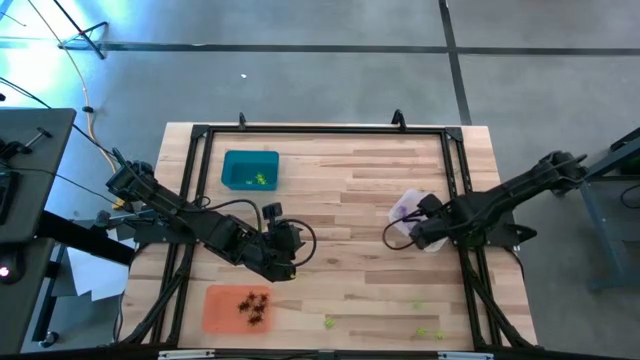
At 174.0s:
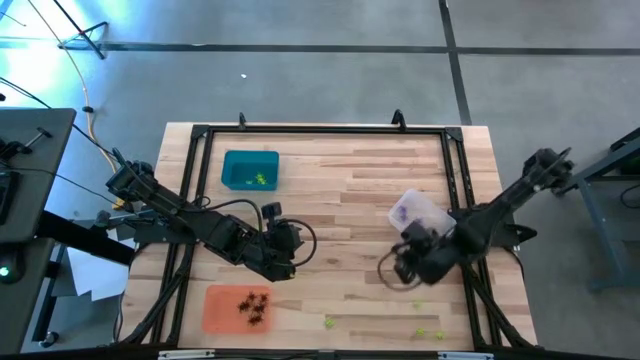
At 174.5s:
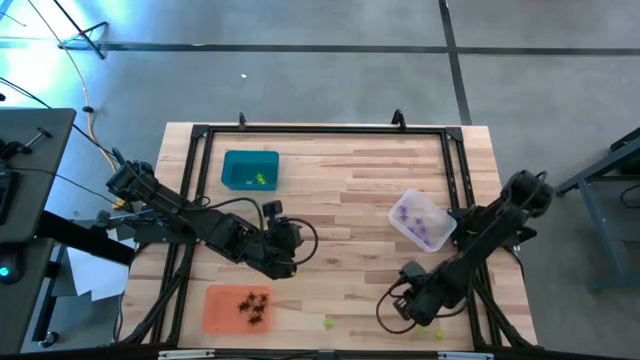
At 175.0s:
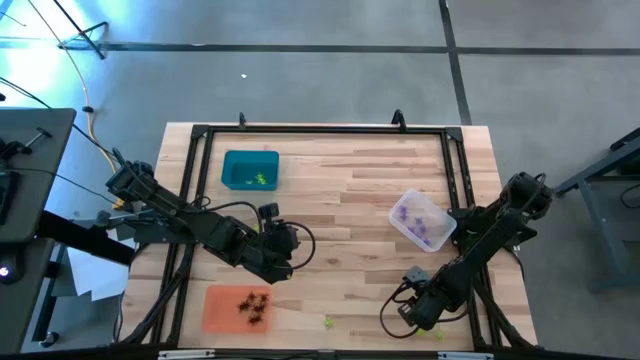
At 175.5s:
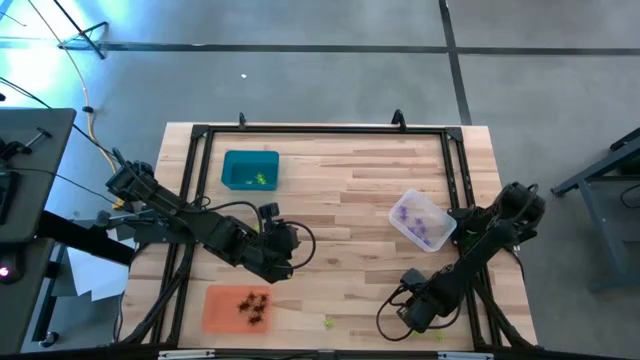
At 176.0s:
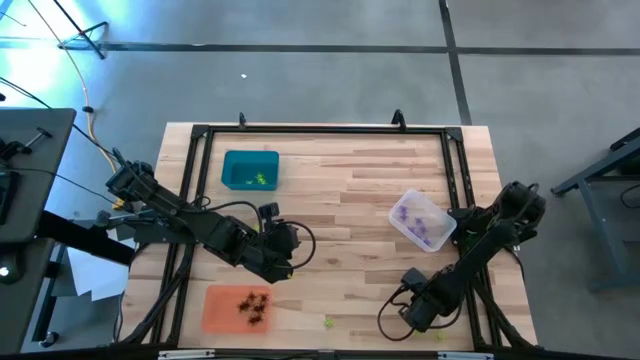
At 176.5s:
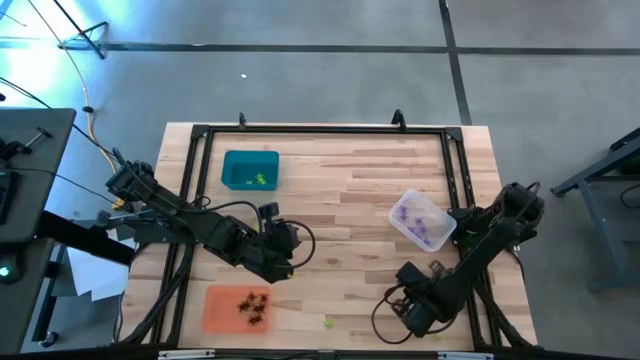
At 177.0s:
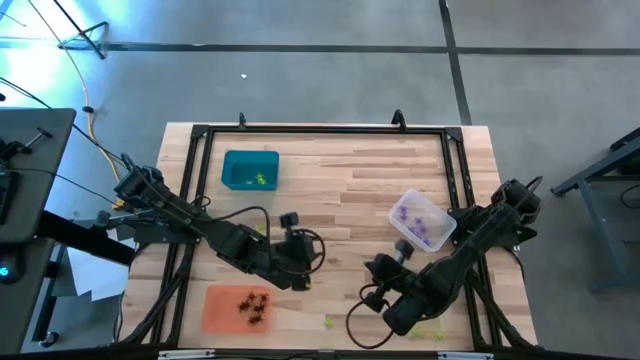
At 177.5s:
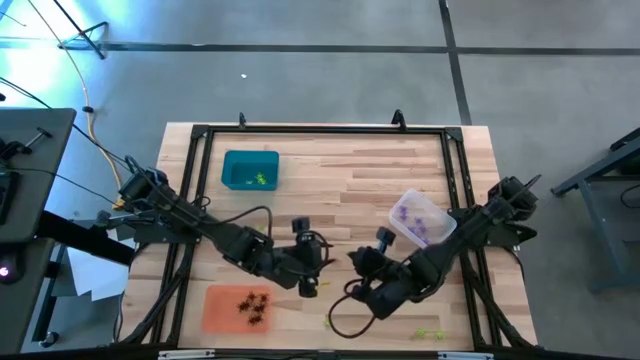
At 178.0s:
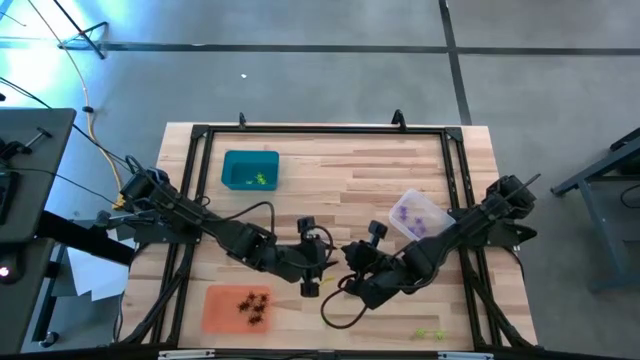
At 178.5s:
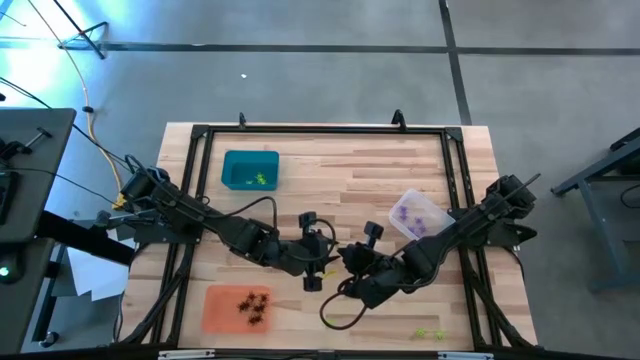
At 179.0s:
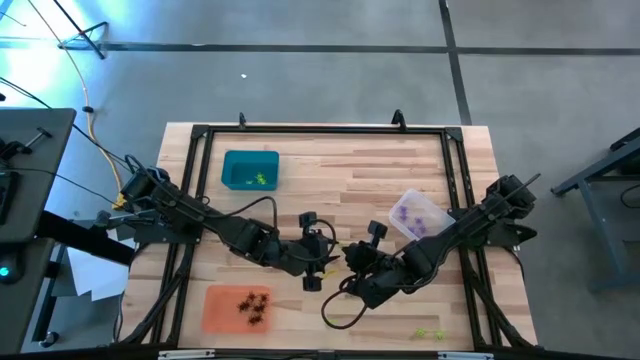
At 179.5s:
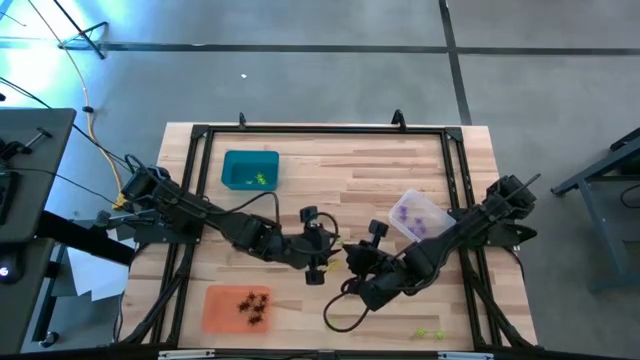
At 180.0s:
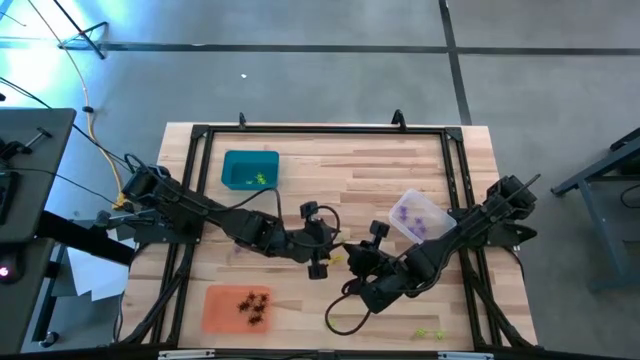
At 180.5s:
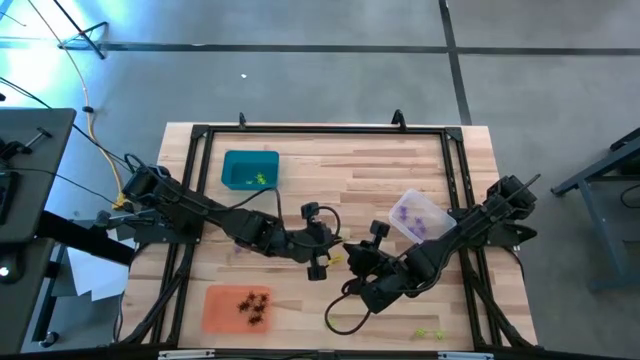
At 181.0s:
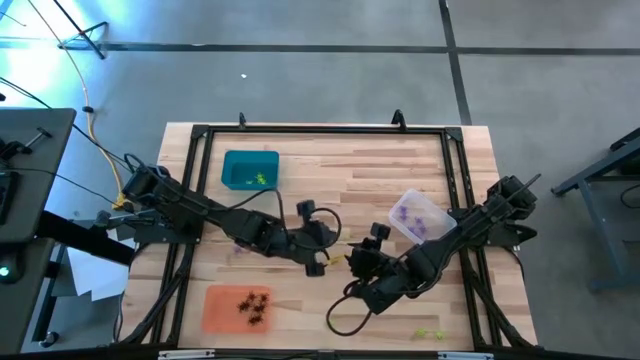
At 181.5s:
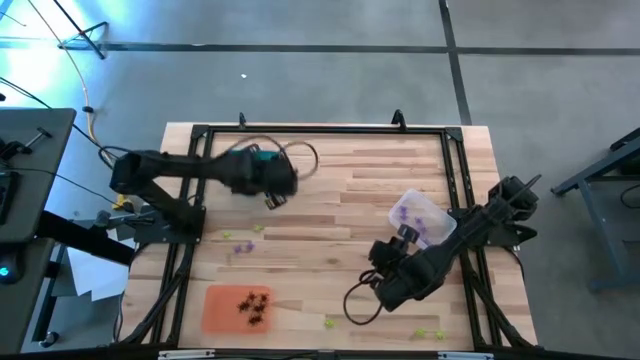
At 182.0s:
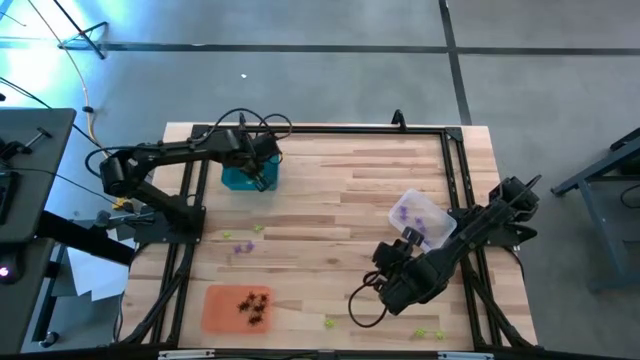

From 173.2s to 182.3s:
Task: Sort Halloween decoration
Put the green spider toy into the blue bin

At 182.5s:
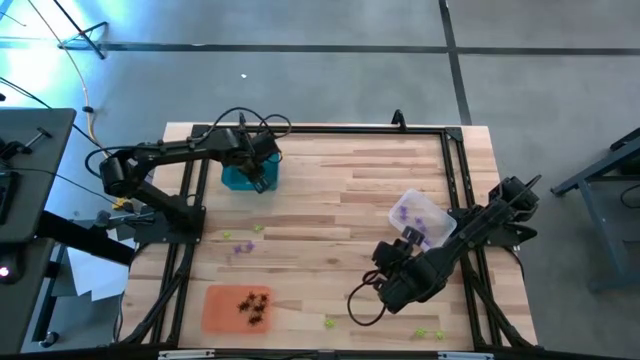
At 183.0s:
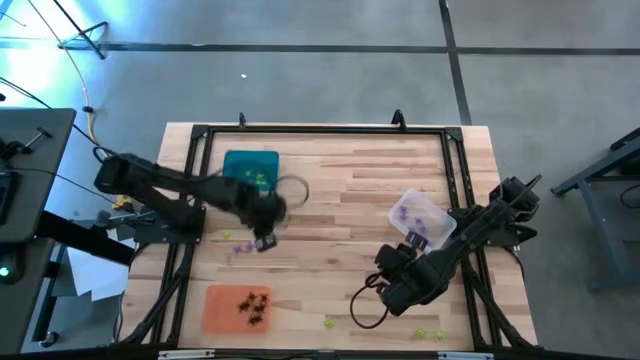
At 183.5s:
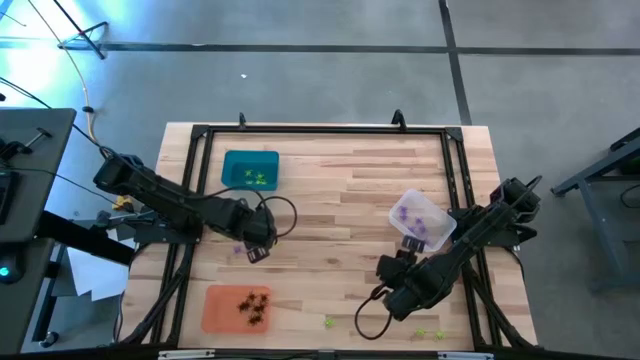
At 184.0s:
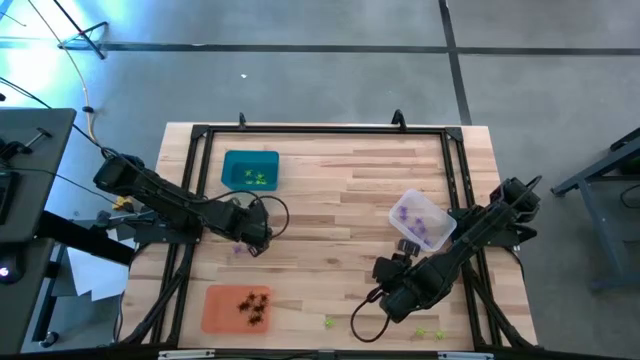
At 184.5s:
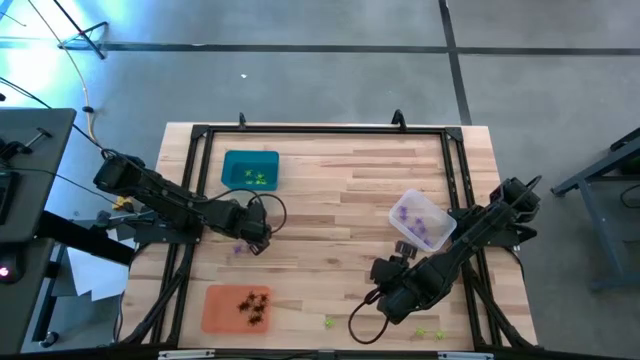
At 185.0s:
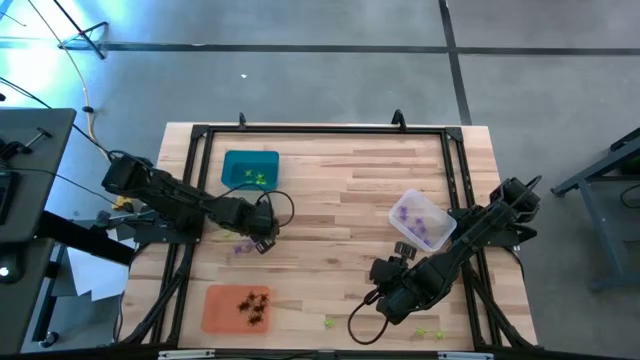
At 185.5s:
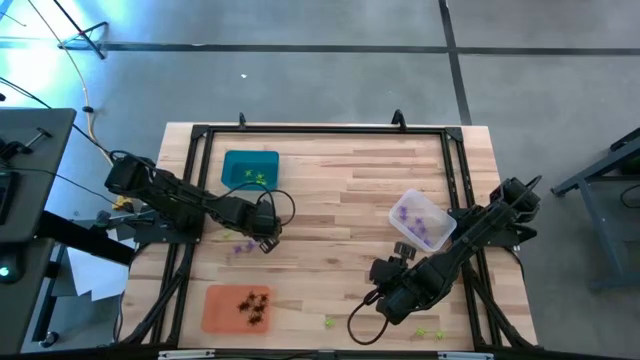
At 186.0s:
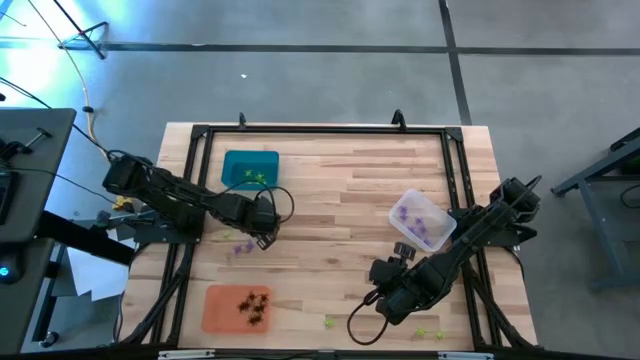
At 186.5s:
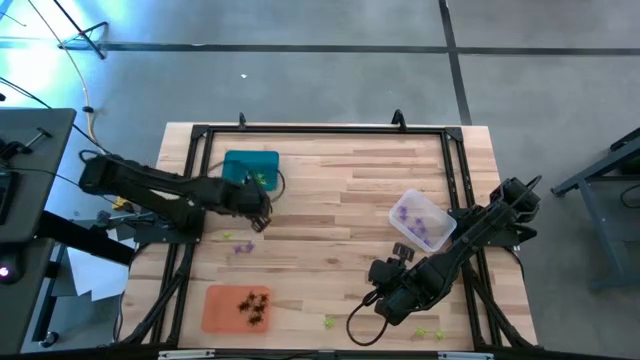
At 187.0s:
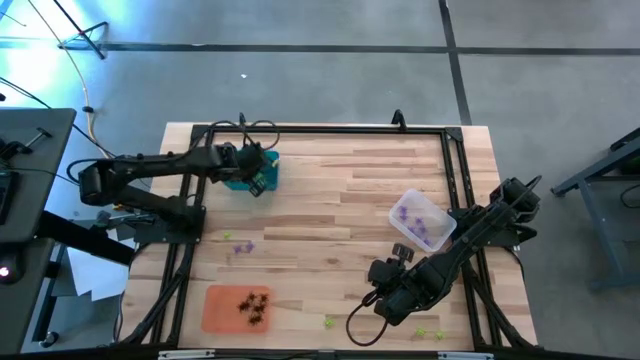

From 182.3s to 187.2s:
Put the green spider toy into the blue bin

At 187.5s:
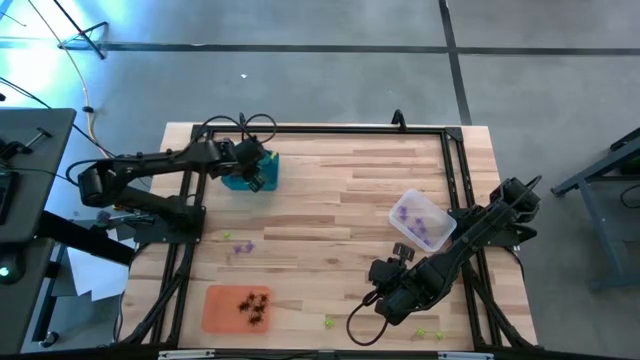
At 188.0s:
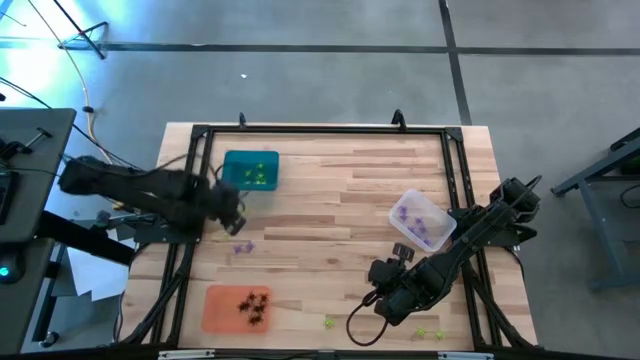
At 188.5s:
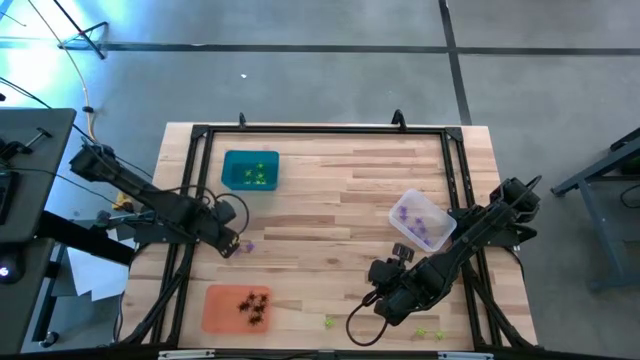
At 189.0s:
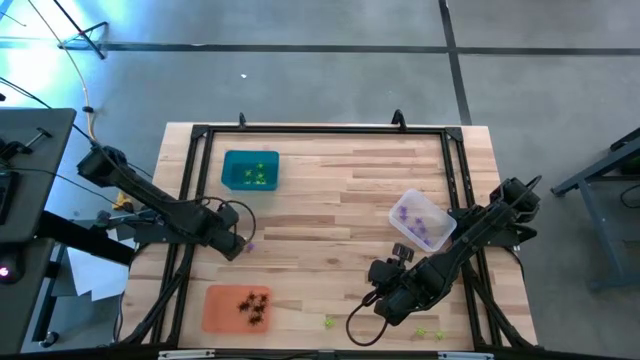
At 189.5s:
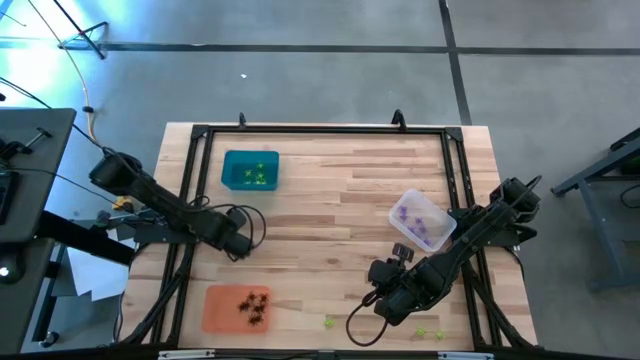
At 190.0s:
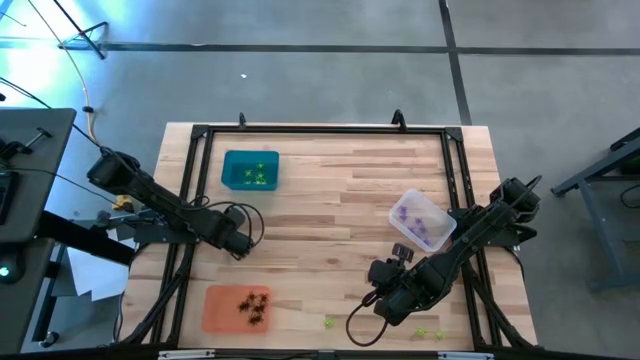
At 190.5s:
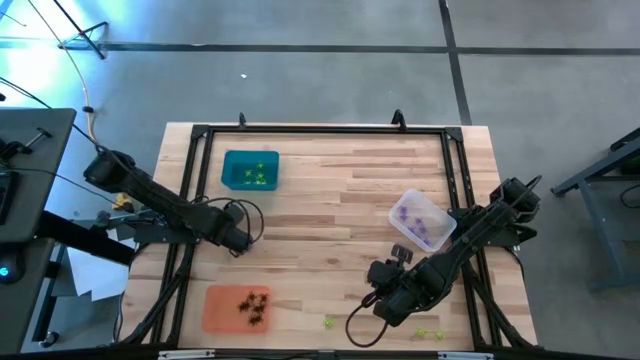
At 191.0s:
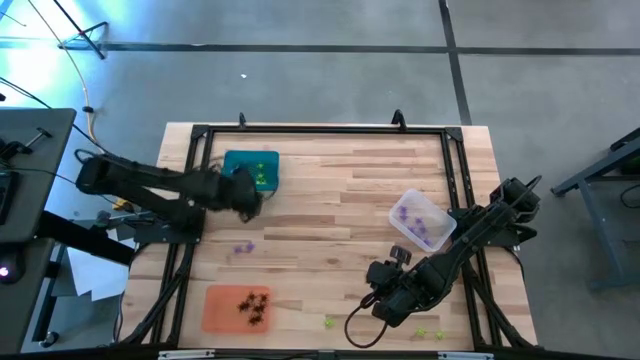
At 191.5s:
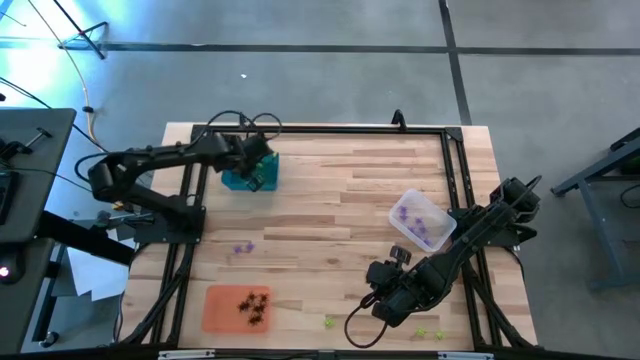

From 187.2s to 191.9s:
Put the green spider toy into the blue bin

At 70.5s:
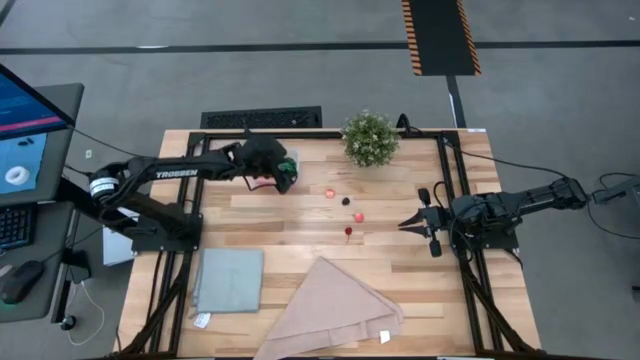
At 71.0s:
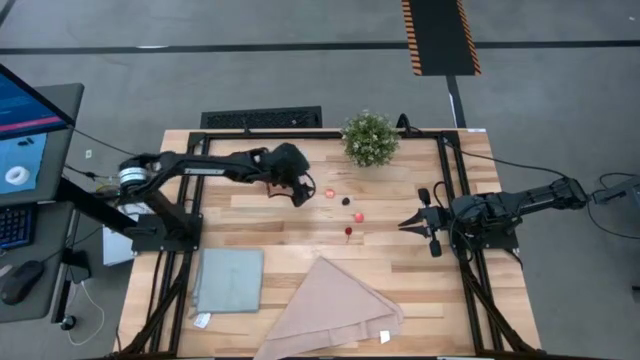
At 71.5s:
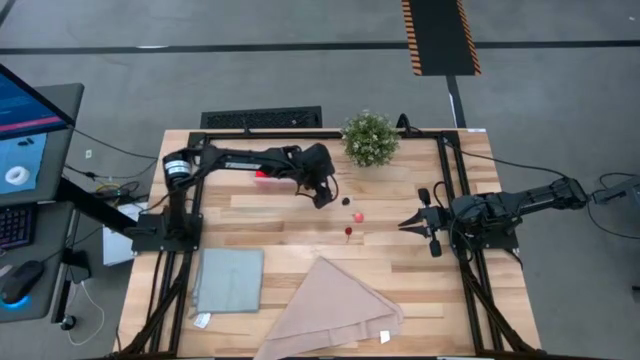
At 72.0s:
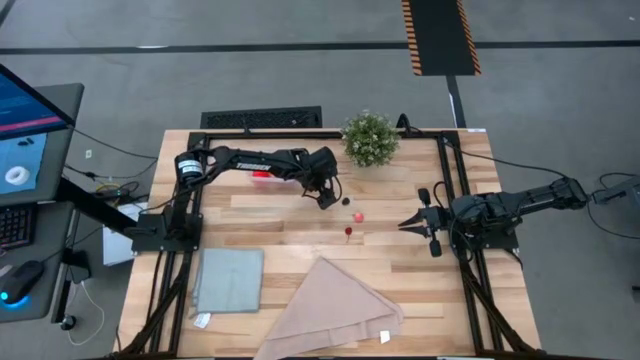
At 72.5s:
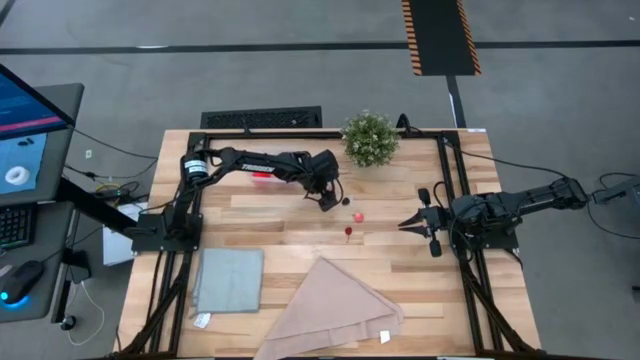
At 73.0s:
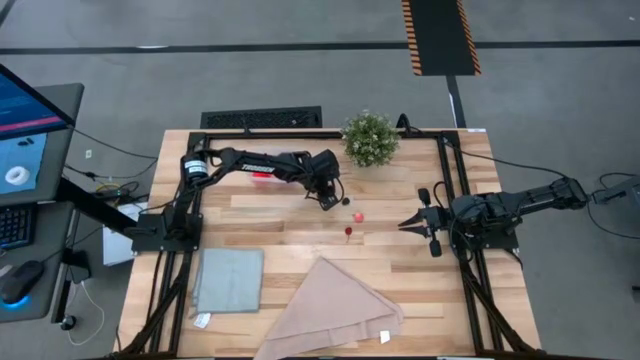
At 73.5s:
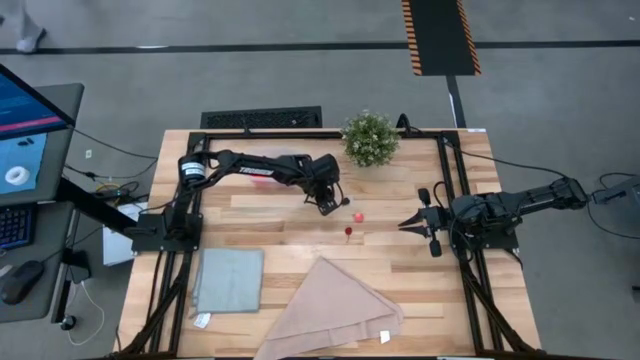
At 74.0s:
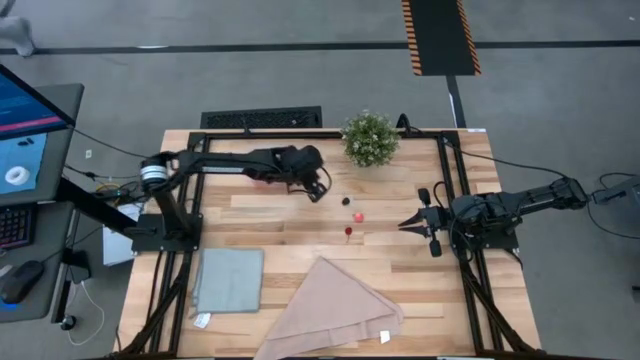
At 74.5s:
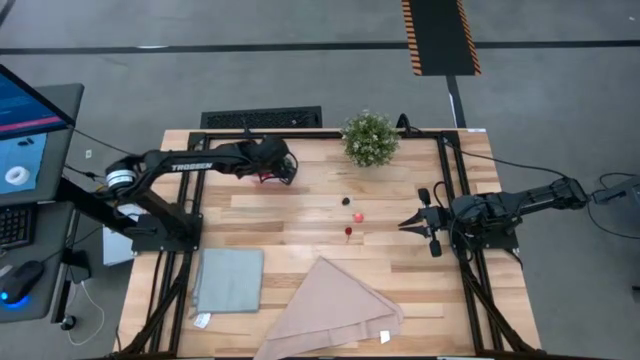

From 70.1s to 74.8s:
Task: Pick and placing Produce into tupperware
Put the pink peach into the transparent container
